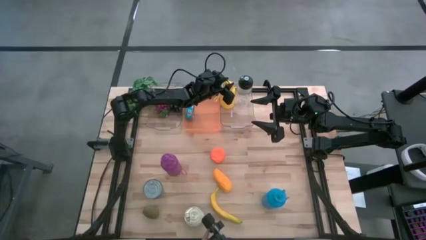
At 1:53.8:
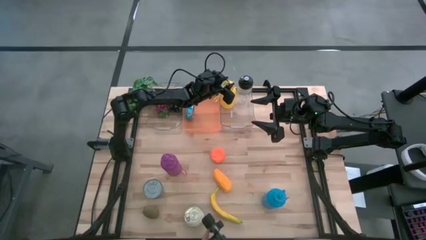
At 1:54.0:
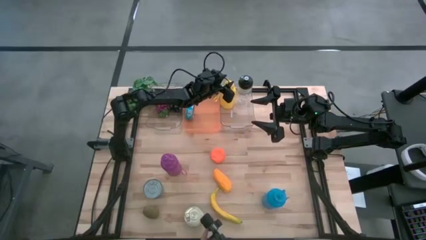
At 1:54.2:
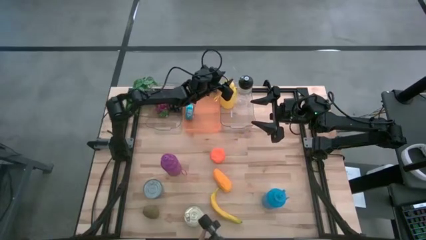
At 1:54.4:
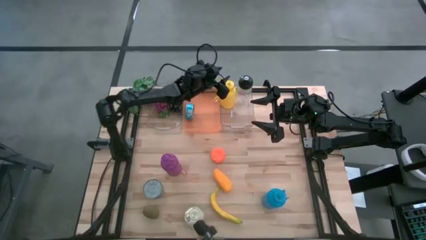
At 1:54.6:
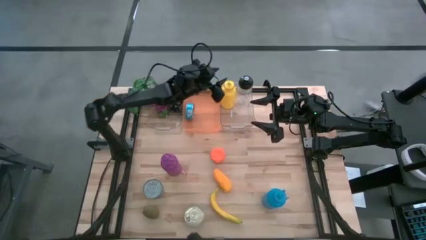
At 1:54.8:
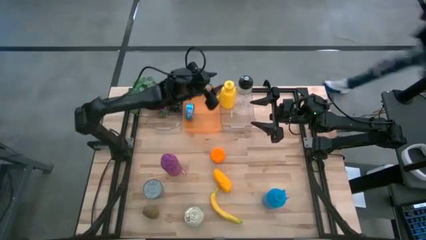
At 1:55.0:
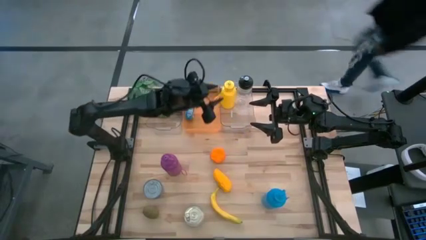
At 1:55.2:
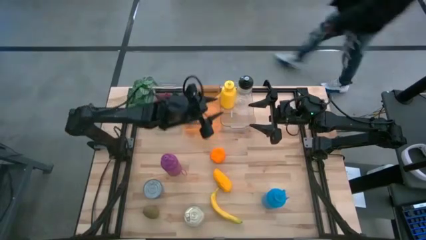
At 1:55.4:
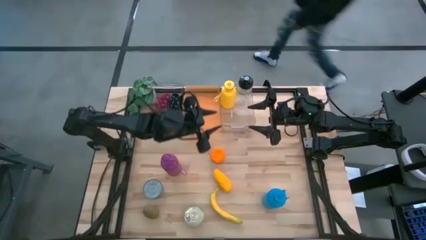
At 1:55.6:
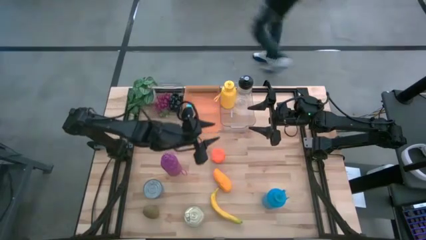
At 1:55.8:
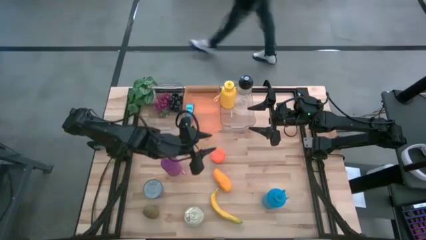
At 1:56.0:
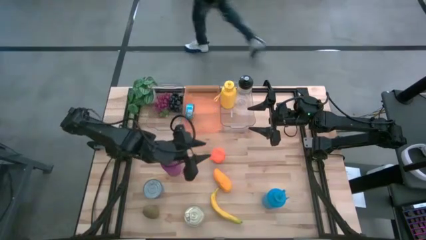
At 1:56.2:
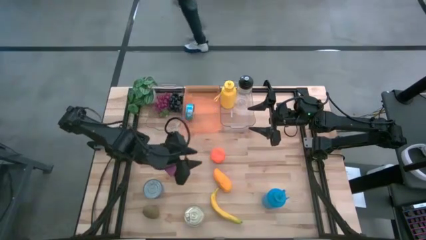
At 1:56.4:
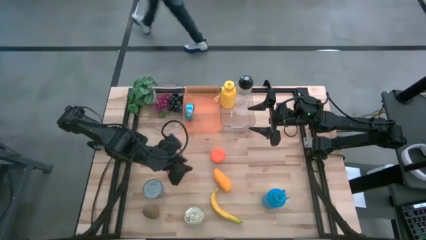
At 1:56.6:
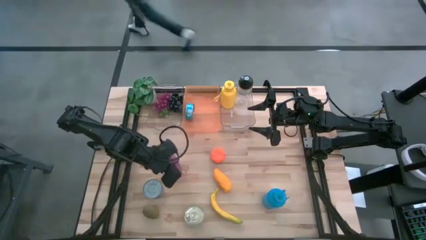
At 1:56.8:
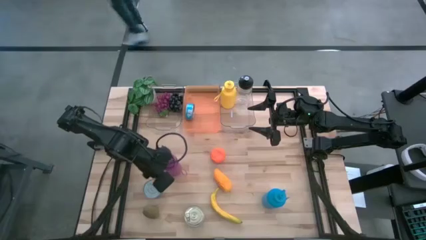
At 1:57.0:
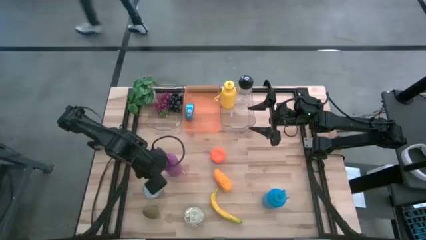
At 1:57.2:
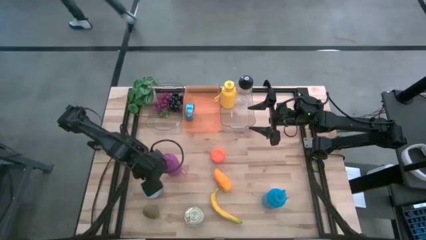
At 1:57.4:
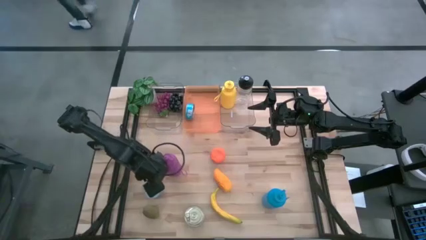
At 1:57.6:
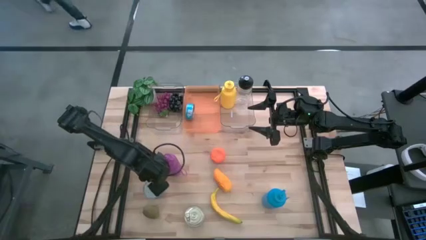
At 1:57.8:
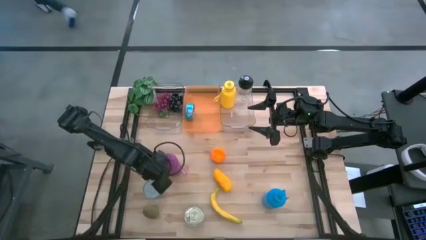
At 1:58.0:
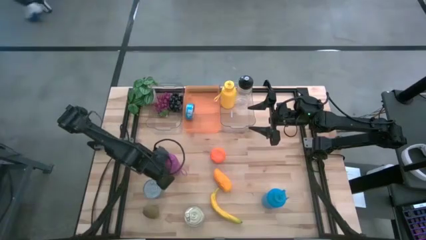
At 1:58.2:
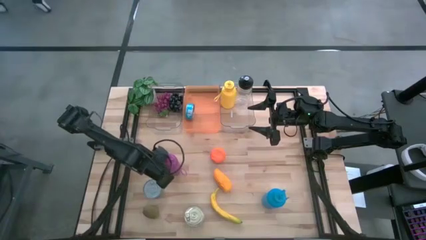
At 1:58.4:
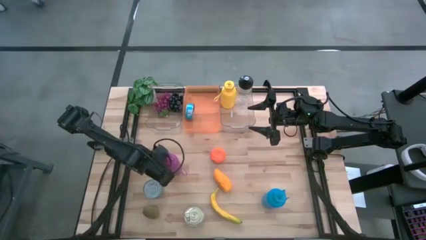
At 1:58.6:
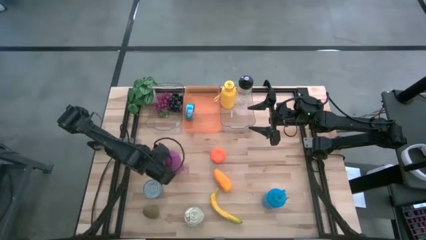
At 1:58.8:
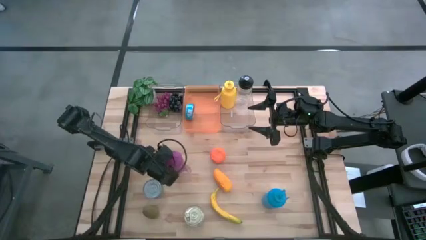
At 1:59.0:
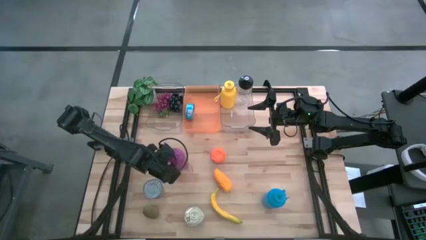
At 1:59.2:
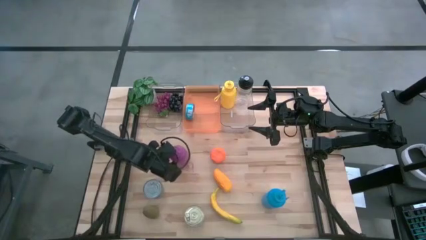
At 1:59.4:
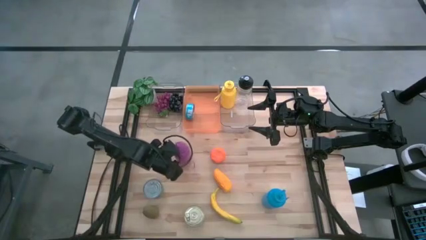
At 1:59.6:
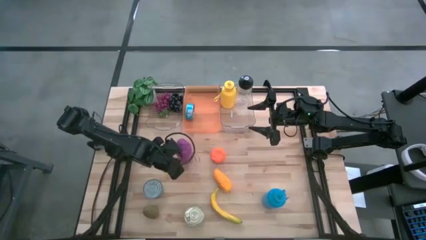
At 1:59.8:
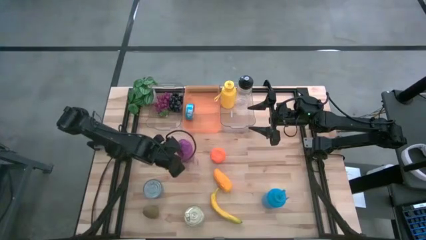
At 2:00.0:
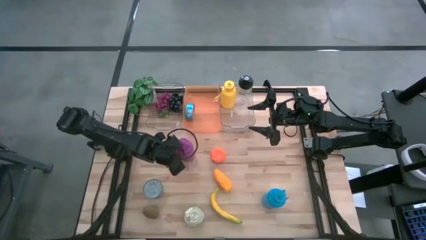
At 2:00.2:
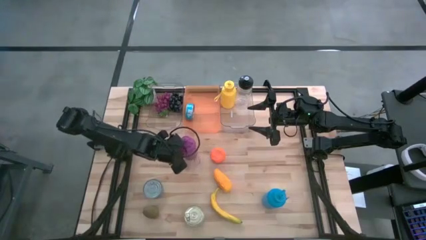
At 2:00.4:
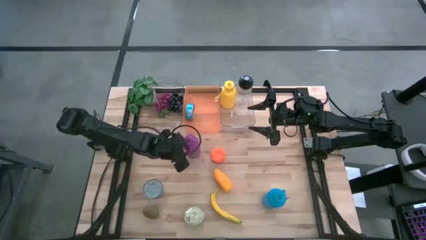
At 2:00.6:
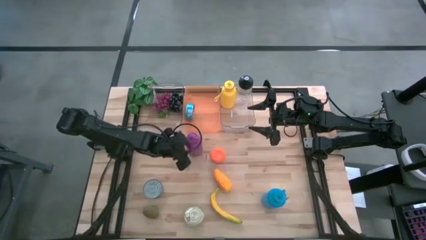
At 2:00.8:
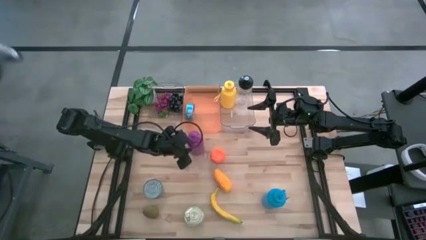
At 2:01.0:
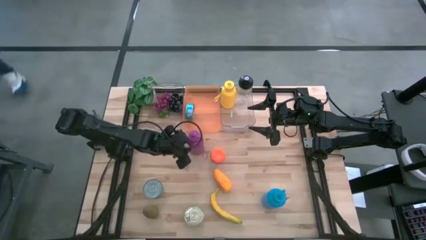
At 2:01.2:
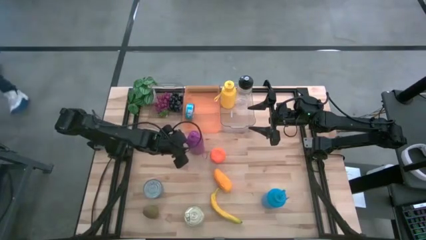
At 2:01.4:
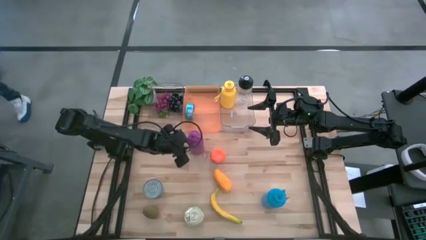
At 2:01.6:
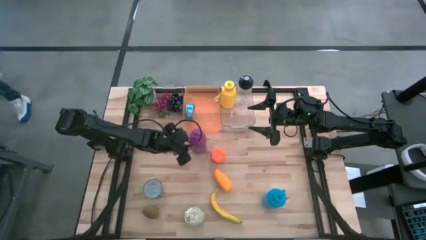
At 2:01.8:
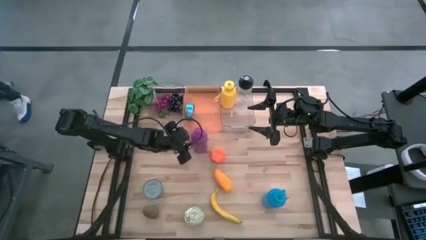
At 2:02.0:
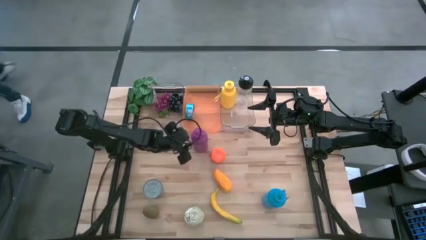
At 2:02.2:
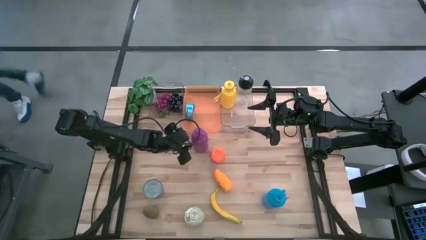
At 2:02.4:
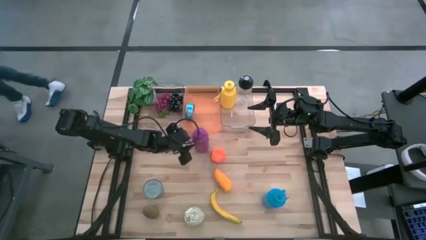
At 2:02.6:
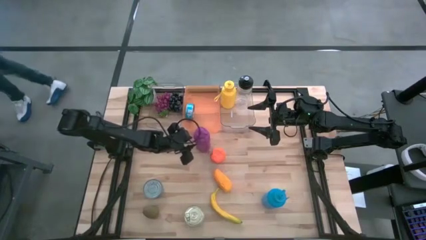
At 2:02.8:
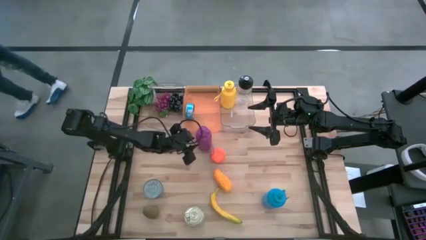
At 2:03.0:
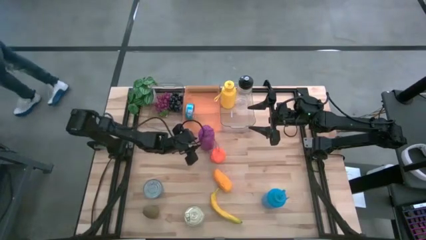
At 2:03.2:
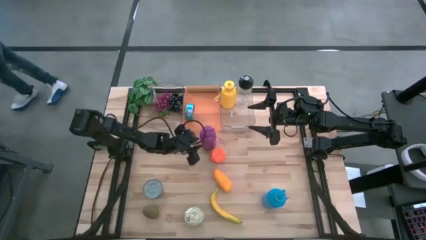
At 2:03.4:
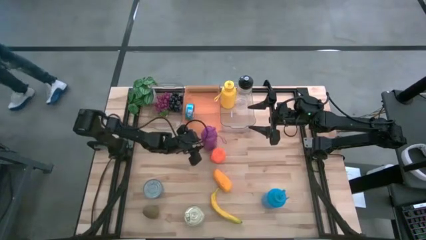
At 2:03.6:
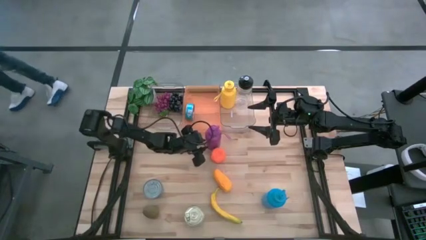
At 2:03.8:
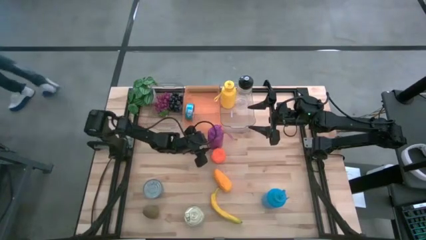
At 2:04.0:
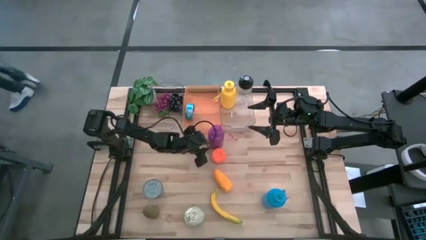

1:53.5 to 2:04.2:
Task: Pick & Place Food Item
Move the violet water bottle to the center of the table

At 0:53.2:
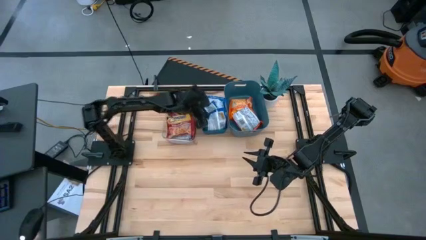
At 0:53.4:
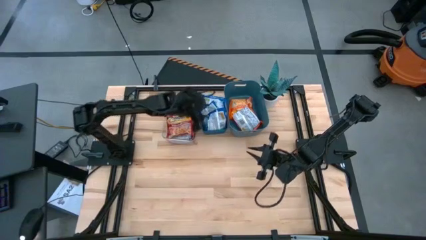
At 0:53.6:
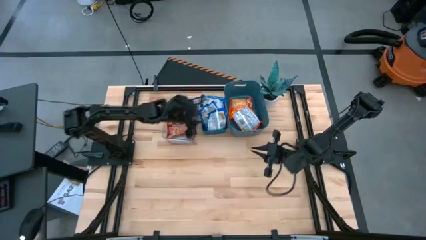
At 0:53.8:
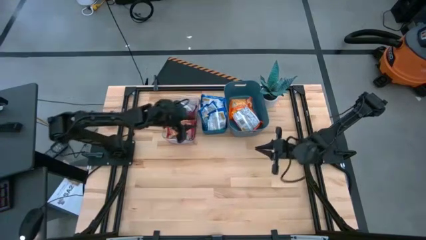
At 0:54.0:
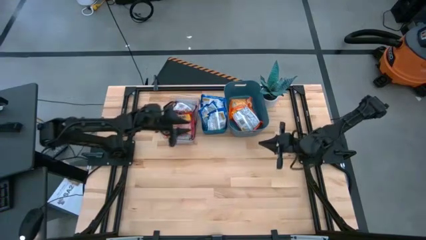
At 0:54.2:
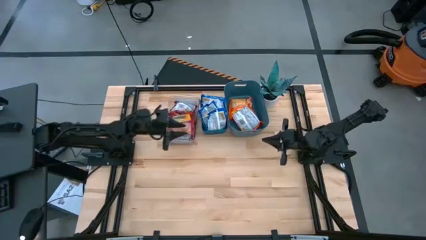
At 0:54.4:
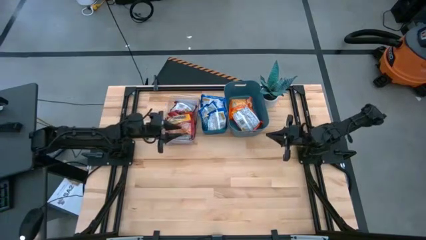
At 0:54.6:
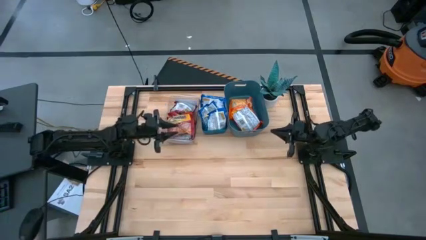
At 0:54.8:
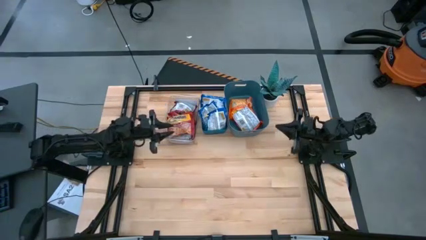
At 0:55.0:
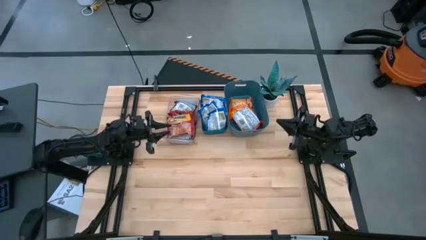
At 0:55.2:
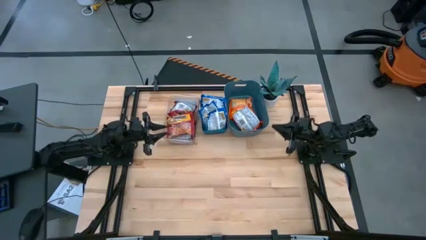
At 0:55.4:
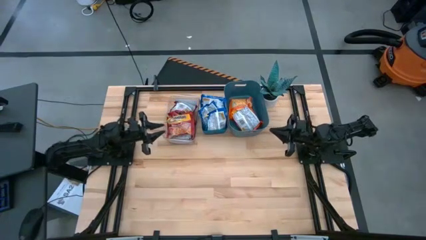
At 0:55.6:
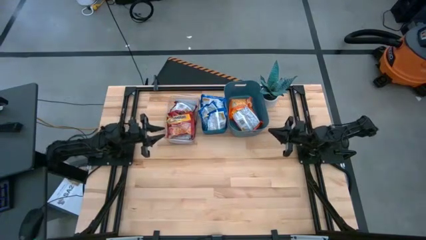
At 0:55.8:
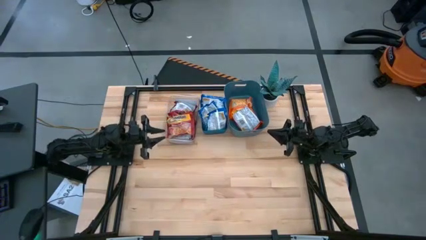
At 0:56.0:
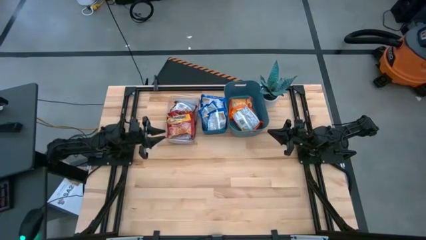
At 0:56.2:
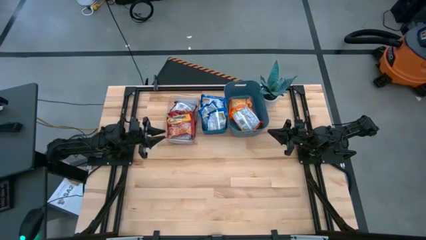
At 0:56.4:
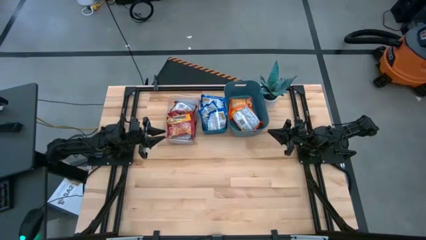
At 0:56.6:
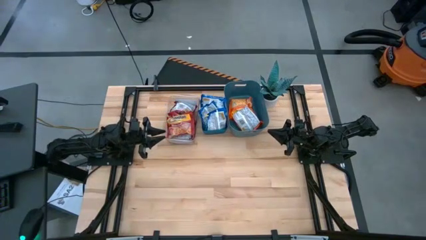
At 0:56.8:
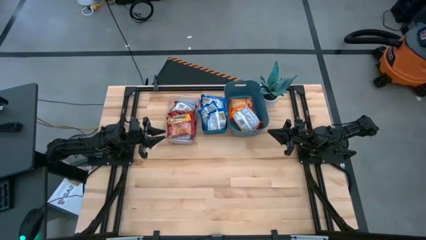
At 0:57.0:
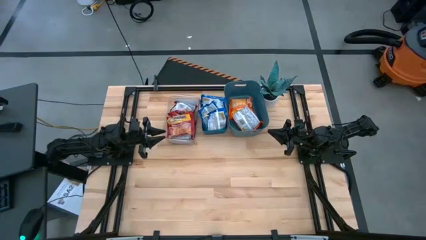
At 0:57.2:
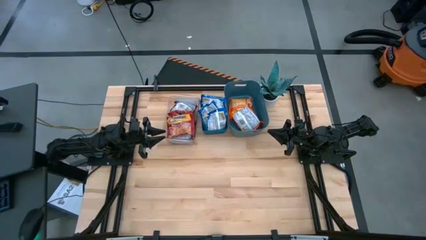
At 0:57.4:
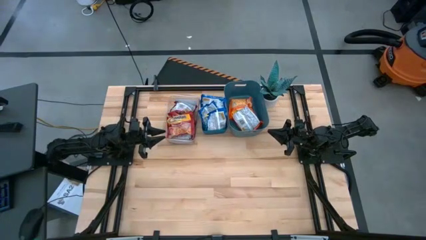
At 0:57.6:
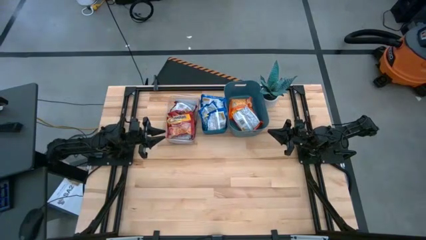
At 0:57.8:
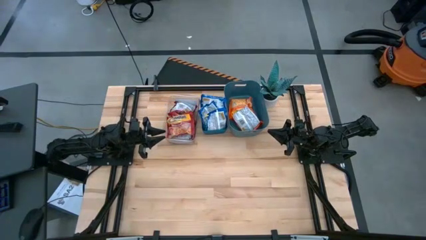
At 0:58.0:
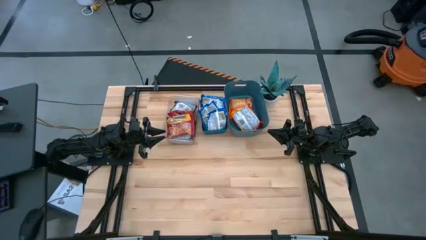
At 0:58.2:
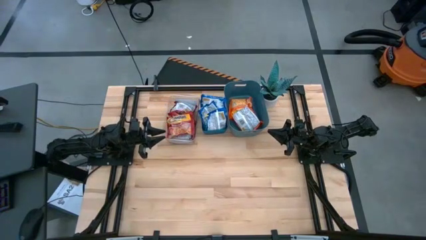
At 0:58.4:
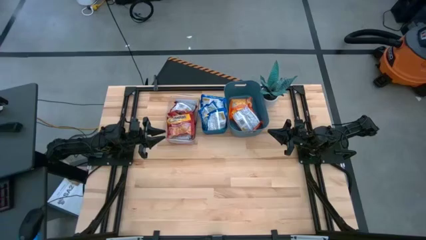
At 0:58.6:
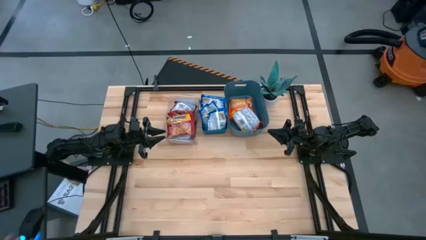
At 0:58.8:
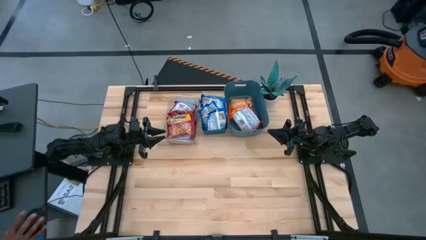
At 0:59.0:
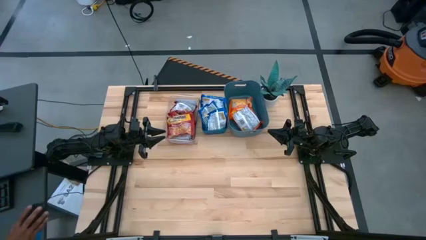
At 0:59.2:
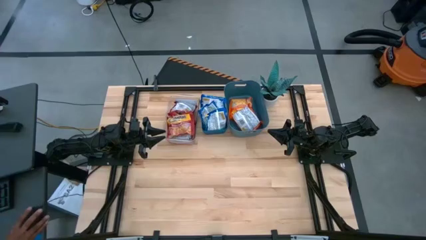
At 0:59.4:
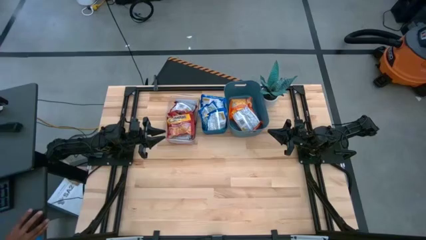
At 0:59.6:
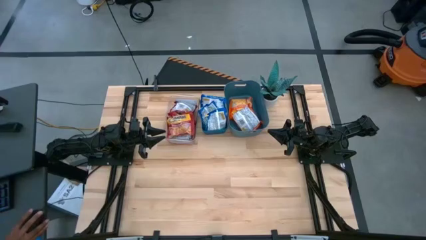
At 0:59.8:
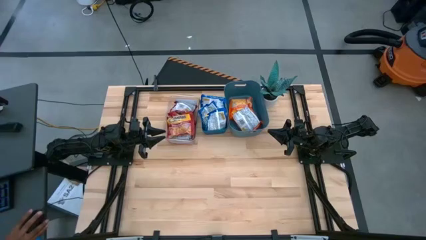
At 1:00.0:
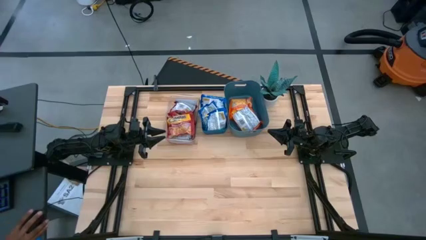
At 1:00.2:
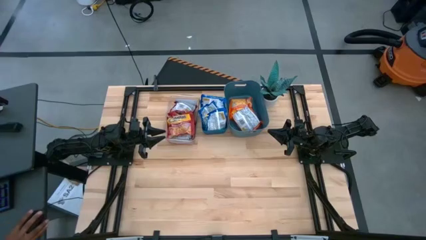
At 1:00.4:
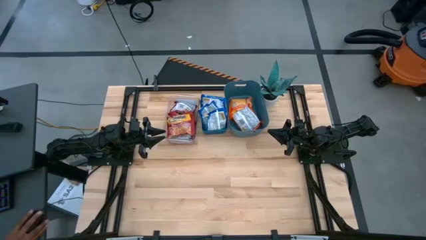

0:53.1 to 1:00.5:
Task: Sort Maruchan noodles
Return to Home Position
